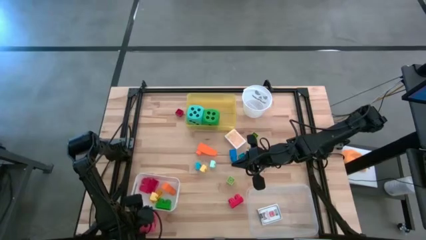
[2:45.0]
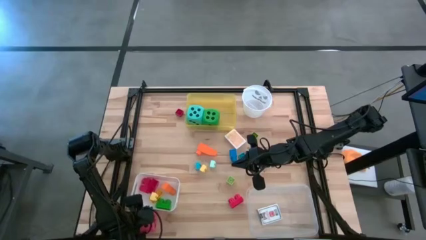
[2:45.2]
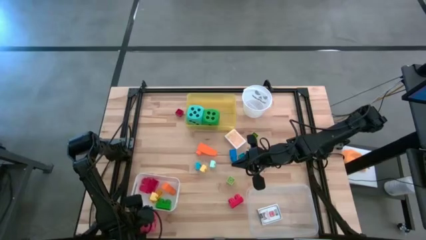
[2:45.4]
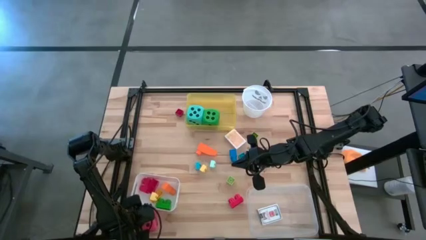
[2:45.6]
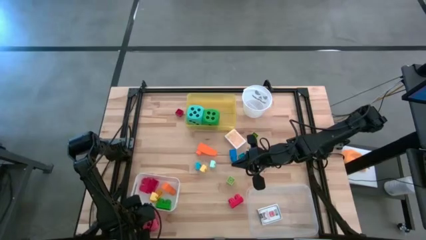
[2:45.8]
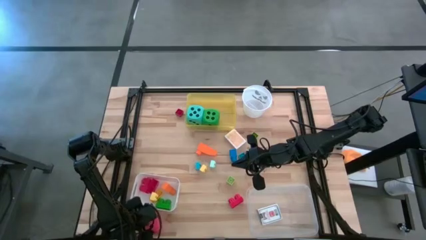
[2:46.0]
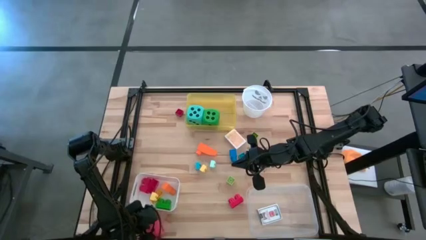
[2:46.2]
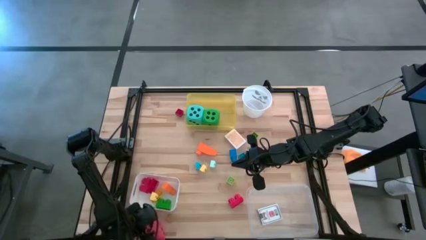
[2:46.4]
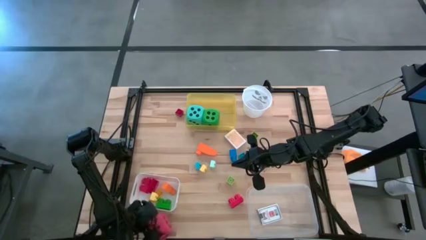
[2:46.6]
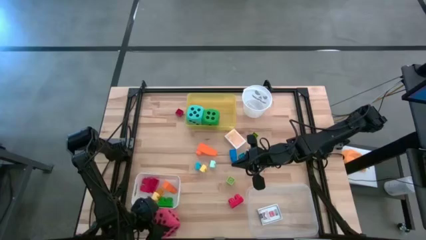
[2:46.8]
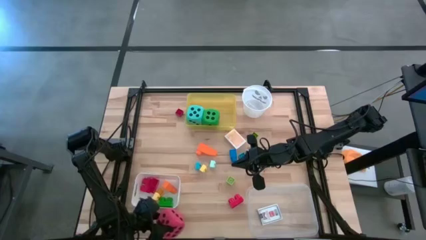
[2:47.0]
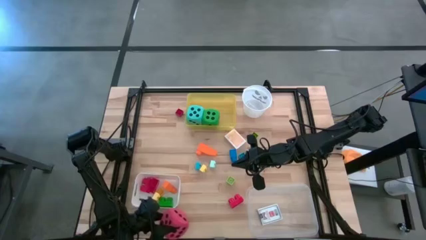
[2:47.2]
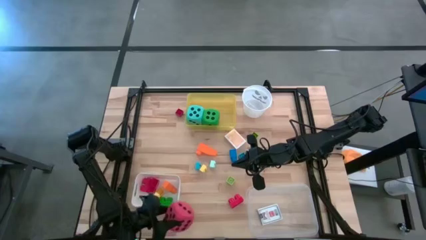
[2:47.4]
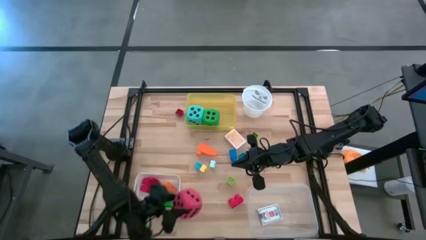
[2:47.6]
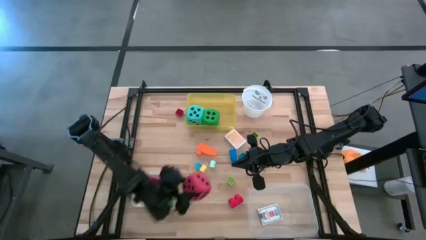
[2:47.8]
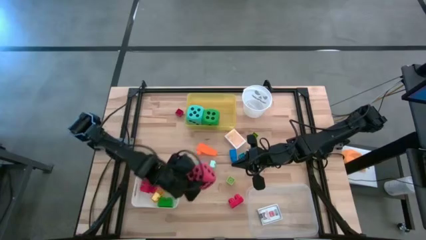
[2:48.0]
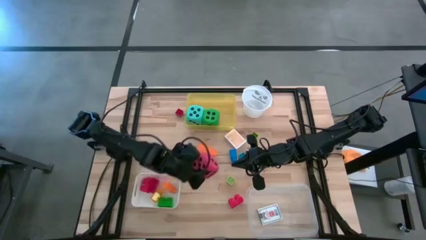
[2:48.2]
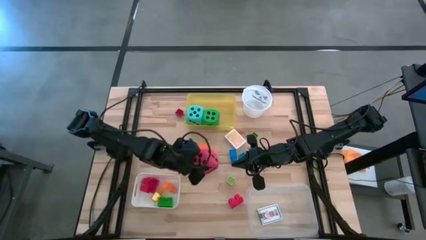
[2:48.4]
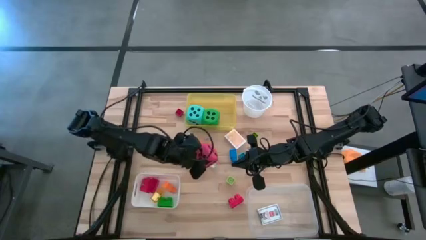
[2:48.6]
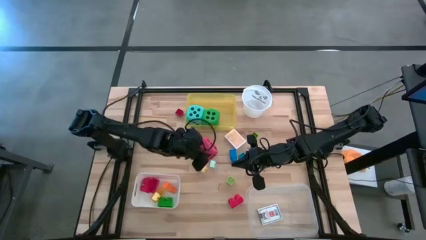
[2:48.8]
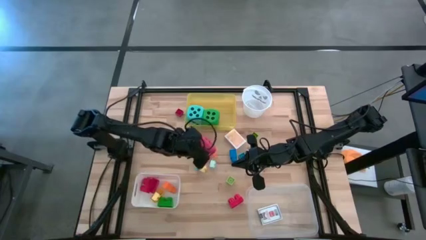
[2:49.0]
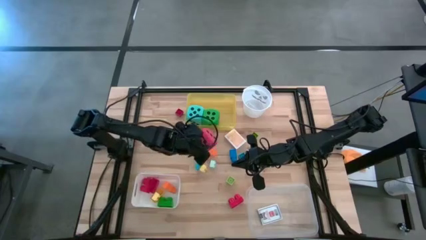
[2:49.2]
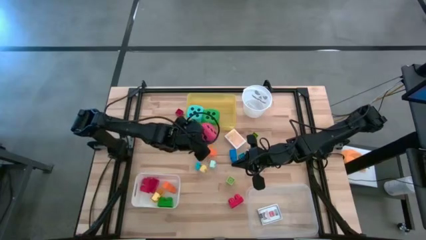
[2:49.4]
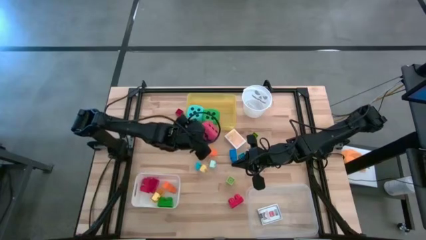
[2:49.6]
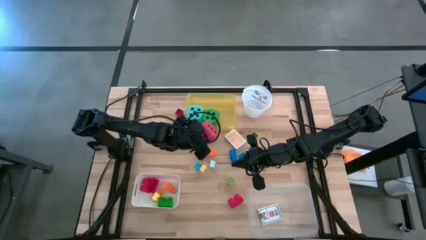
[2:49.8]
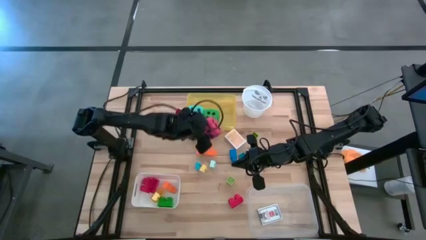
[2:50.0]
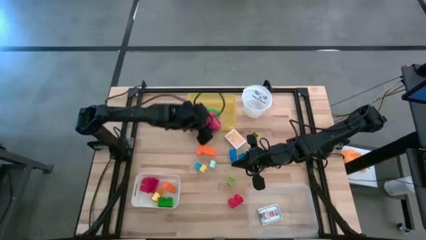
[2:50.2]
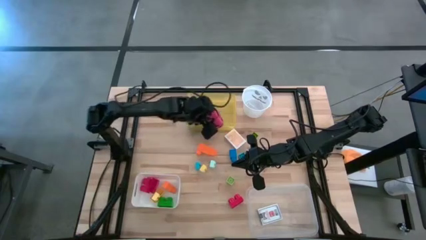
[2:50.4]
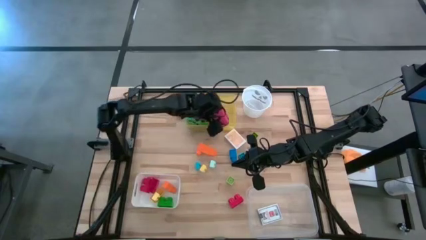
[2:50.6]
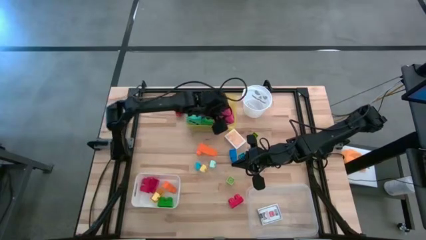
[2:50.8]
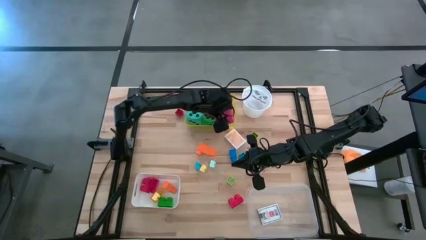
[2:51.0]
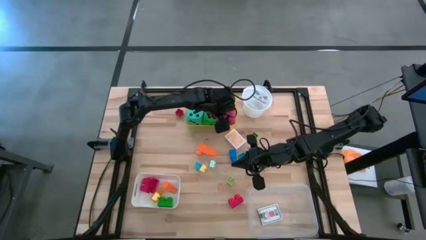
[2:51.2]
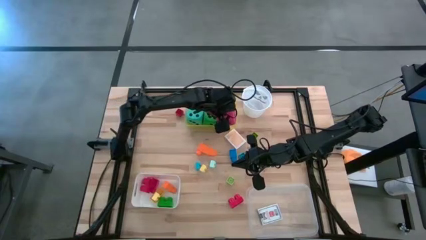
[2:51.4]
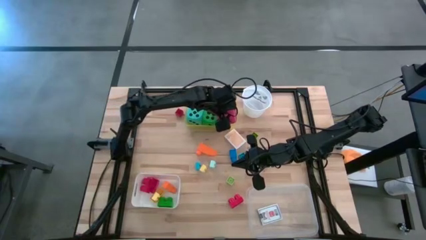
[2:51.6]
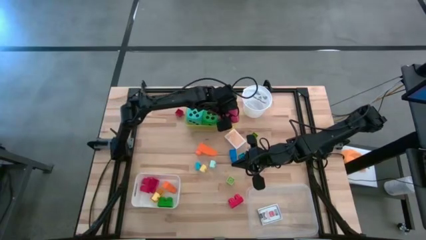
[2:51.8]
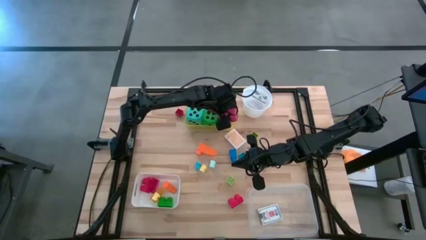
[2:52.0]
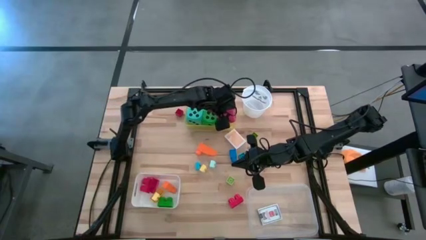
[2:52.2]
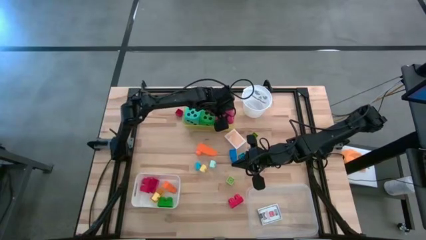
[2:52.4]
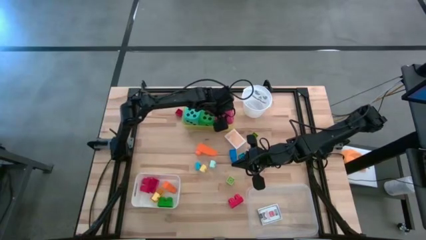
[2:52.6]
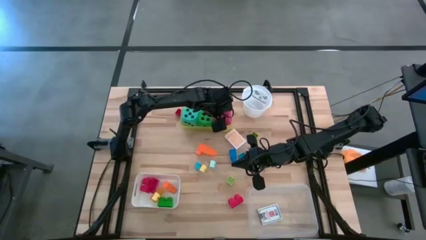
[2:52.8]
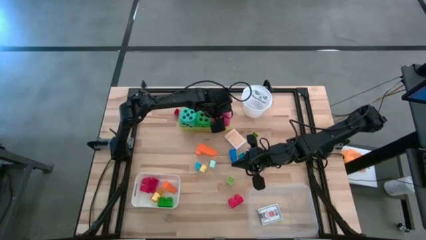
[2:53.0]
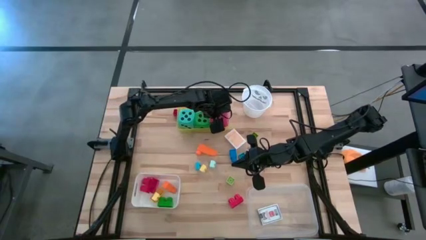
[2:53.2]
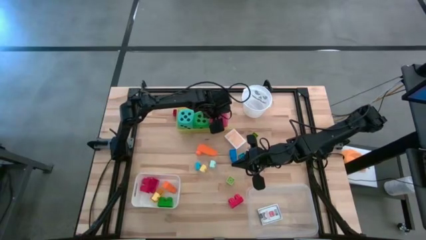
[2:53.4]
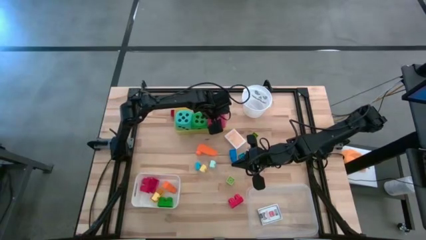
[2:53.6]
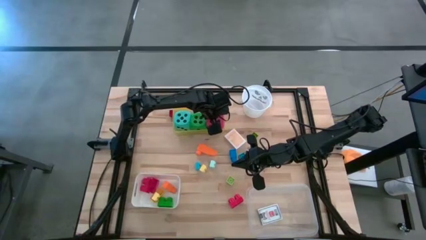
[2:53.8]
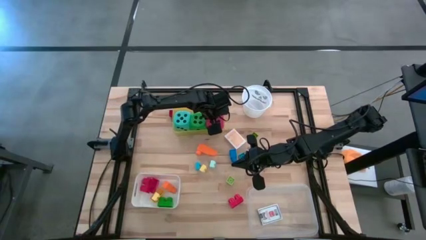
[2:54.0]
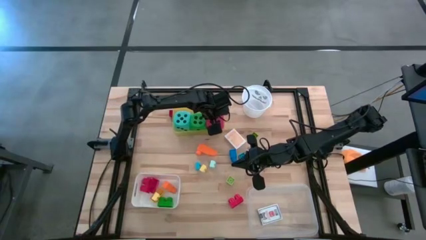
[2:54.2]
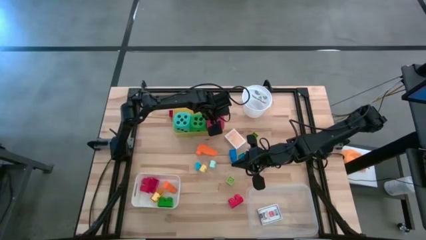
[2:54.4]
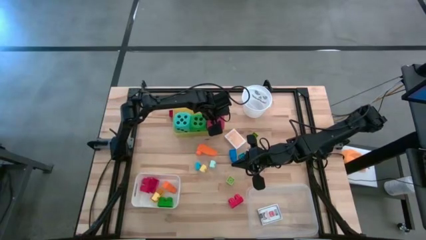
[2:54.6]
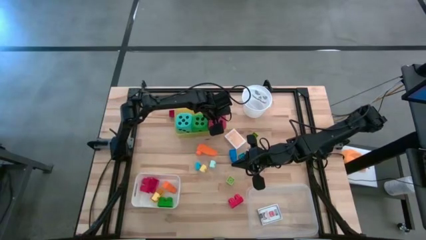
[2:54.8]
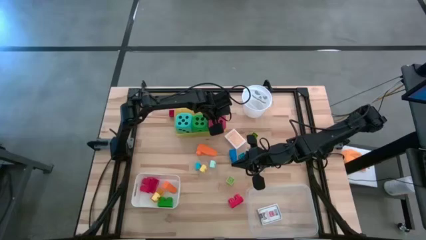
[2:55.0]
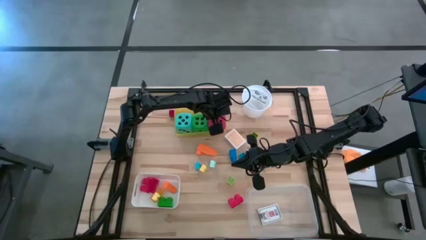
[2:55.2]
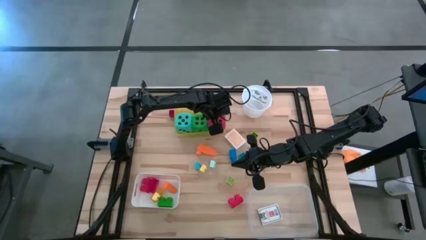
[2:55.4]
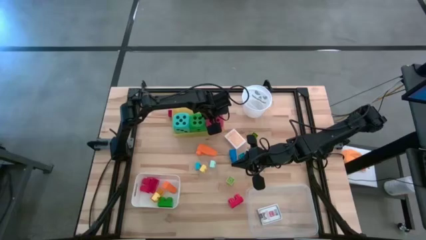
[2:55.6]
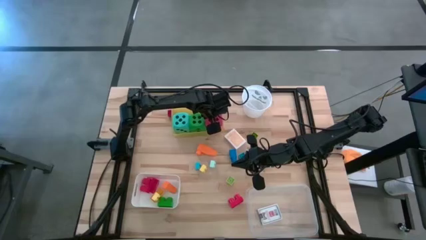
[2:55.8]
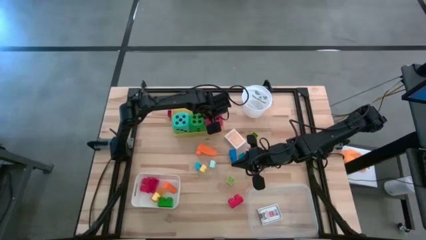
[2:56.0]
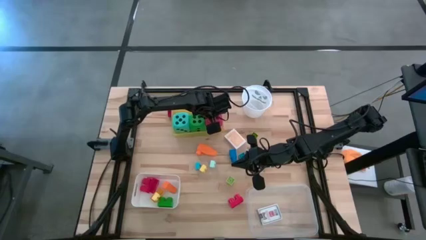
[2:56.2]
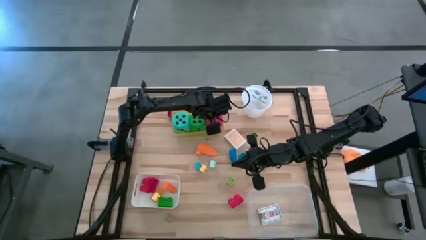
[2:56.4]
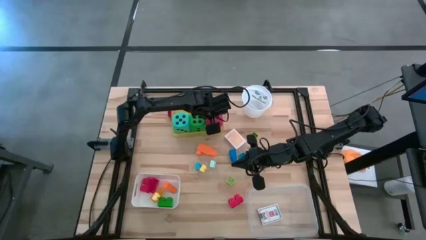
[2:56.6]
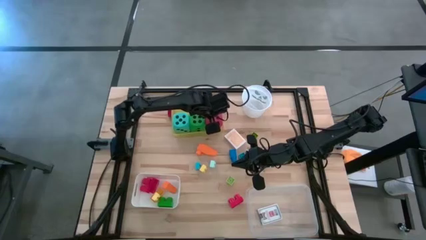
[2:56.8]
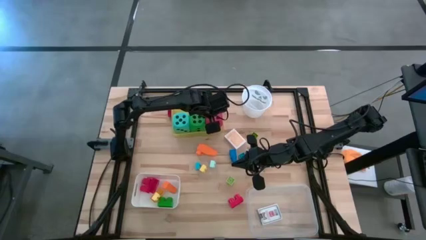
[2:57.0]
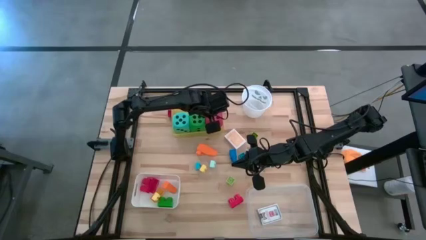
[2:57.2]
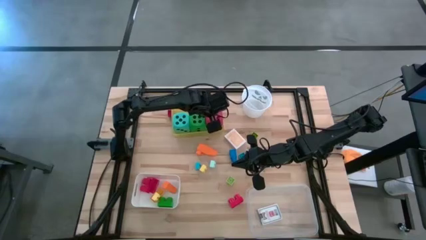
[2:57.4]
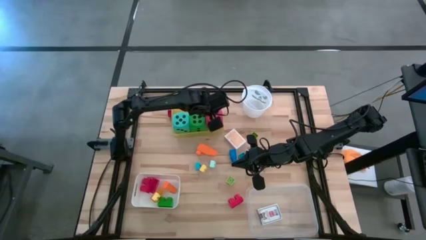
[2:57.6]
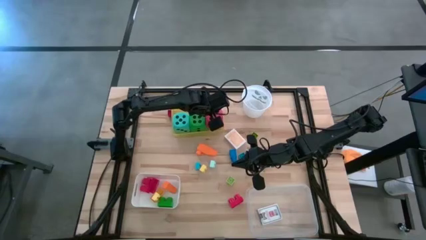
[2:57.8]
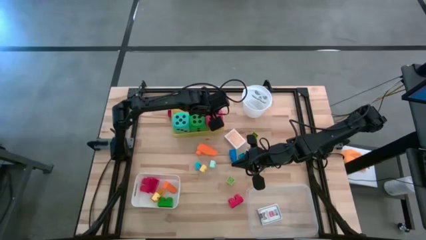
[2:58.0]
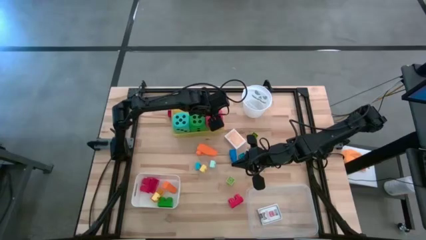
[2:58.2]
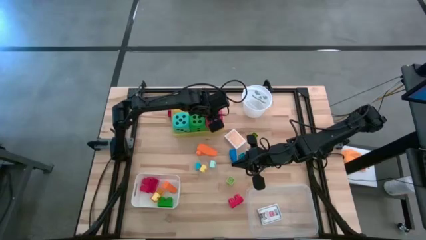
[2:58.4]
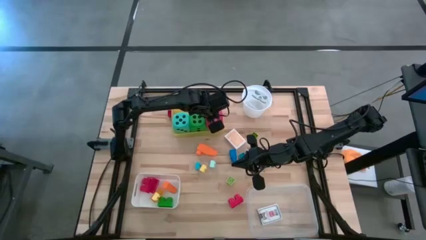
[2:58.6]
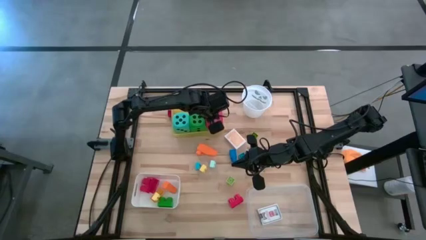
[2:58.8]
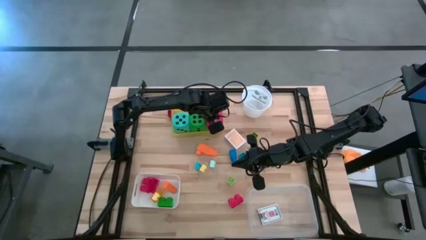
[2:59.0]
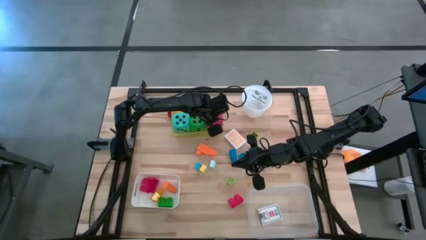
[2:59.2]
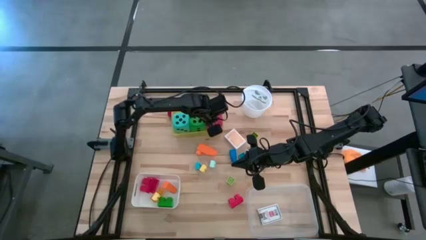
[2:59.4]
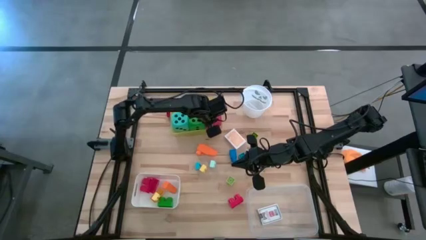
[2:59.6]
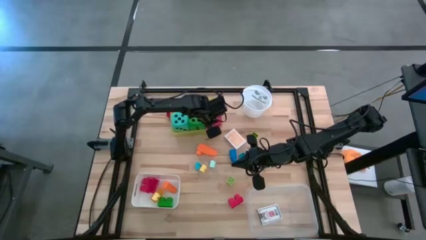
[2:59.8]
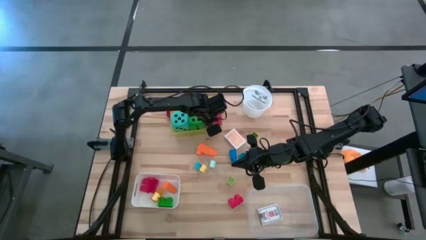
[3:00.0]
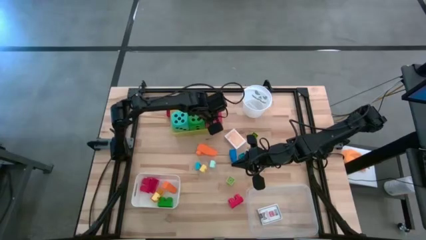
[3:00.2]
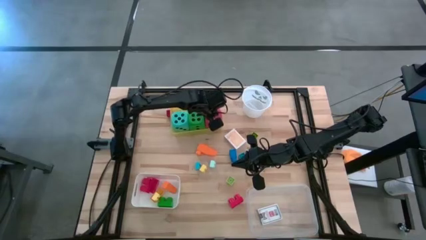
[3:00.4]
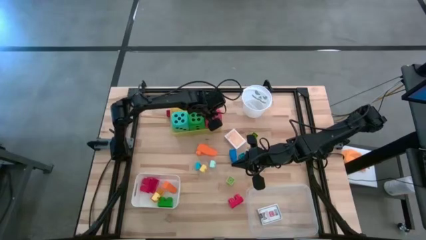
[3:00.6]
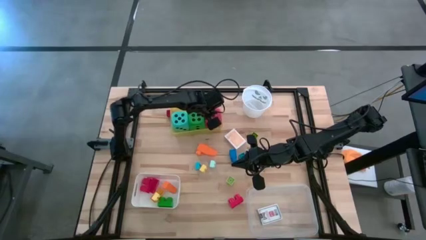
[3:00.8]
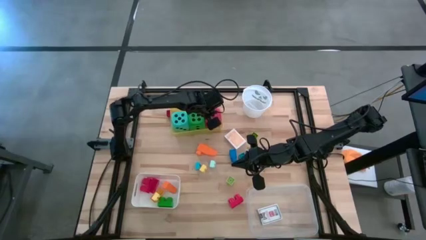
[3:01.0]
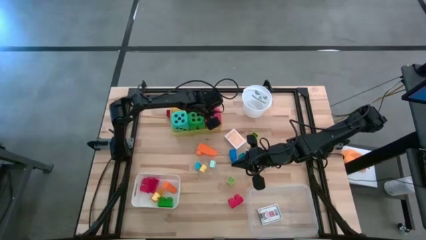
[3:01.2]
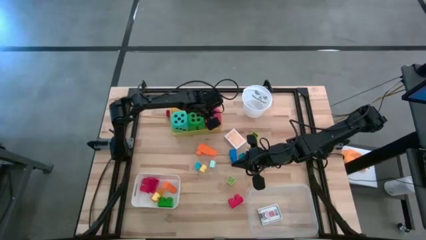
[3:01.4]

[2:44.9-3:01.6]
Task: Pick & Place Toys
Put the pink die into the yellow bin
